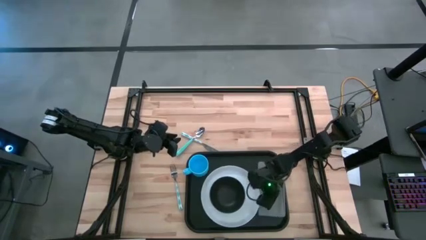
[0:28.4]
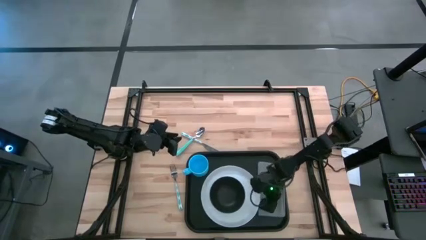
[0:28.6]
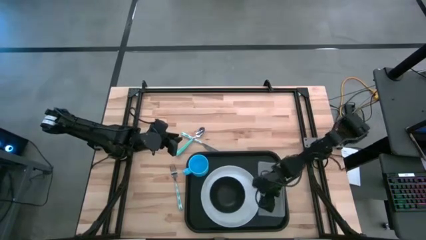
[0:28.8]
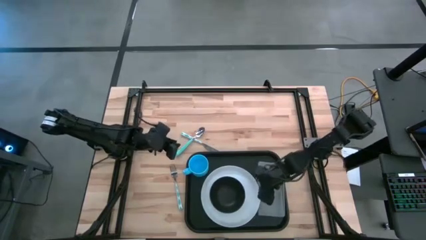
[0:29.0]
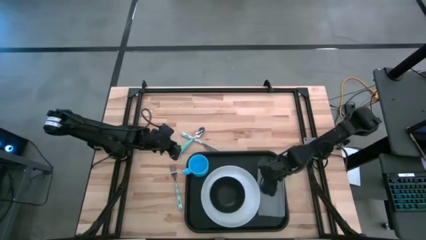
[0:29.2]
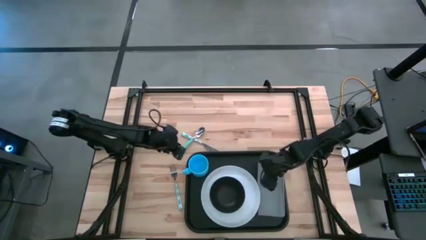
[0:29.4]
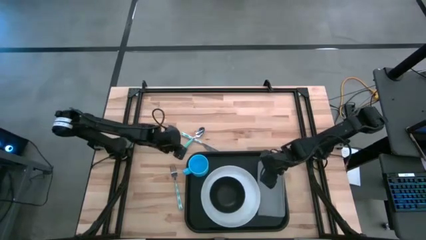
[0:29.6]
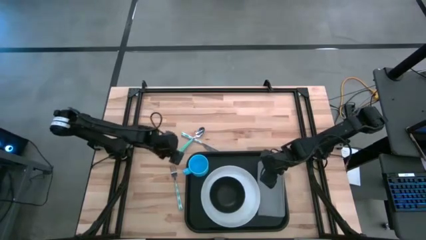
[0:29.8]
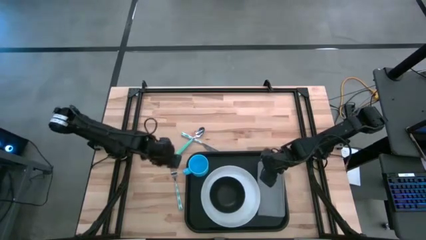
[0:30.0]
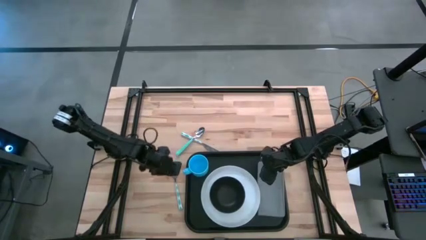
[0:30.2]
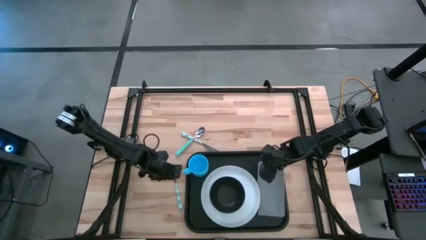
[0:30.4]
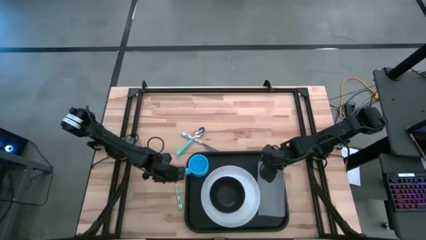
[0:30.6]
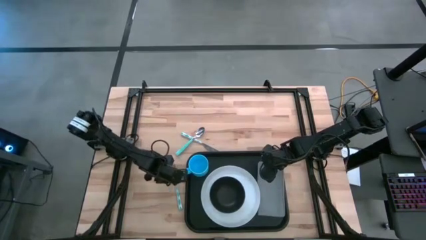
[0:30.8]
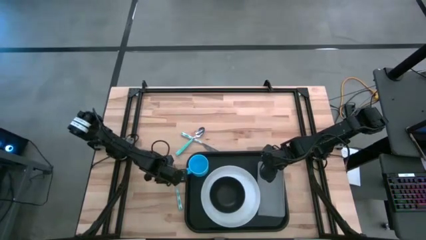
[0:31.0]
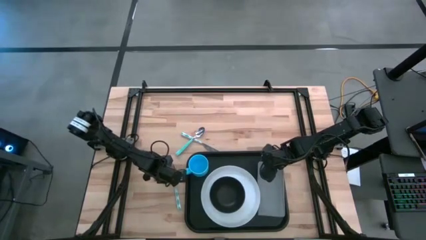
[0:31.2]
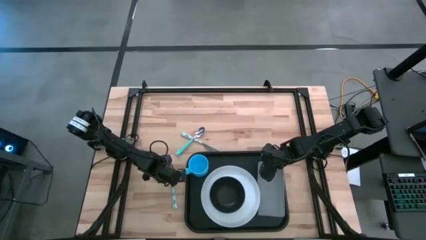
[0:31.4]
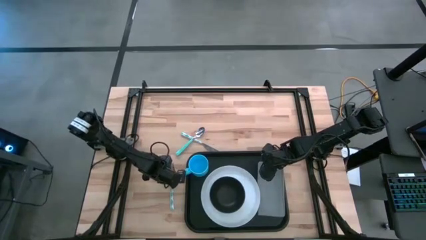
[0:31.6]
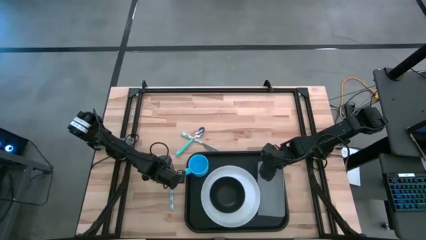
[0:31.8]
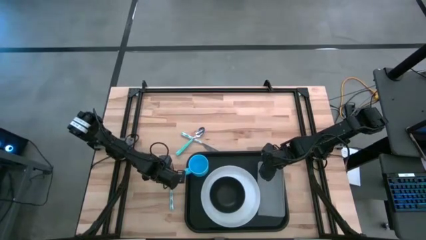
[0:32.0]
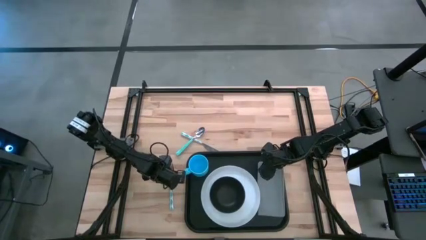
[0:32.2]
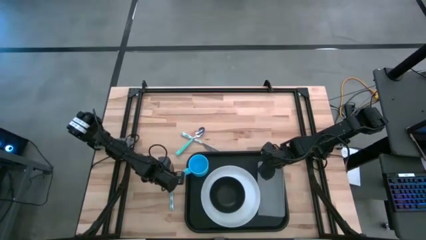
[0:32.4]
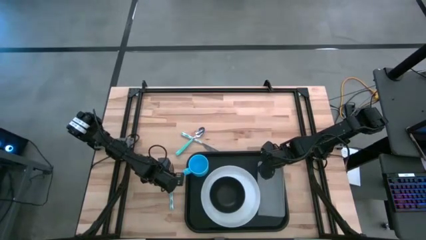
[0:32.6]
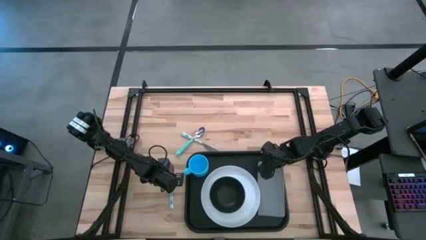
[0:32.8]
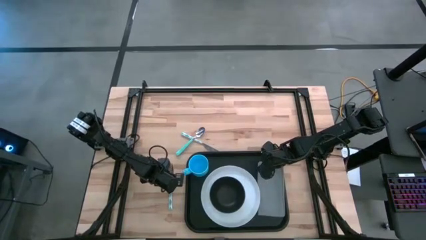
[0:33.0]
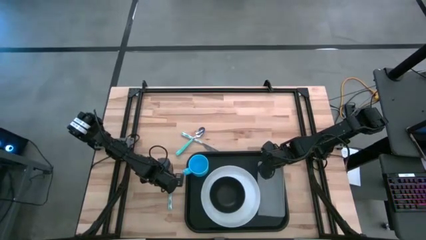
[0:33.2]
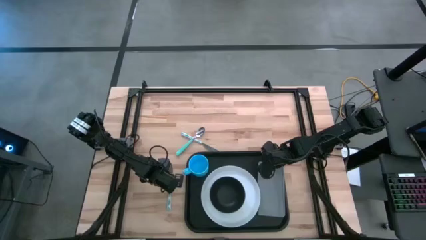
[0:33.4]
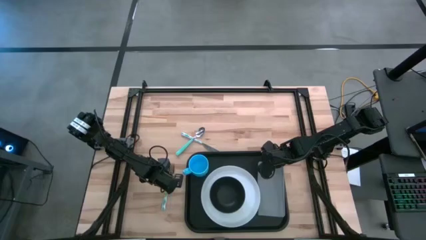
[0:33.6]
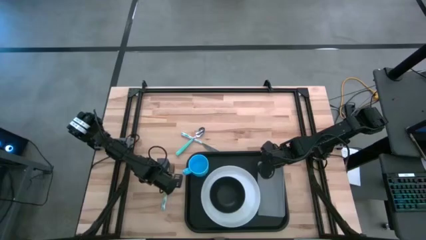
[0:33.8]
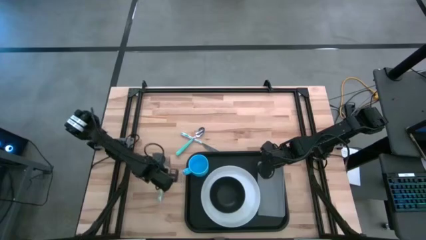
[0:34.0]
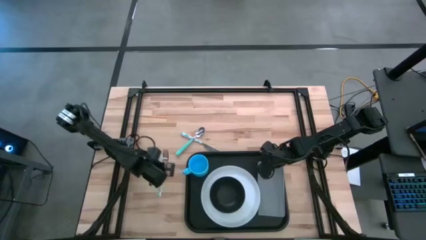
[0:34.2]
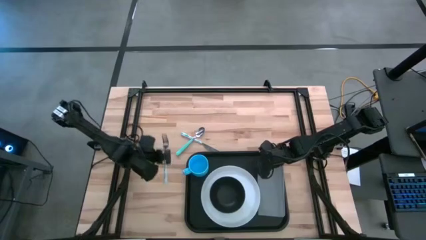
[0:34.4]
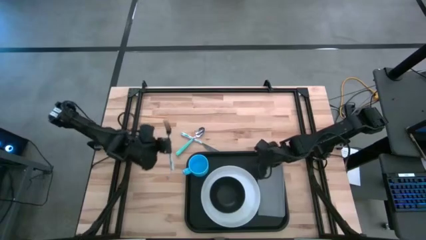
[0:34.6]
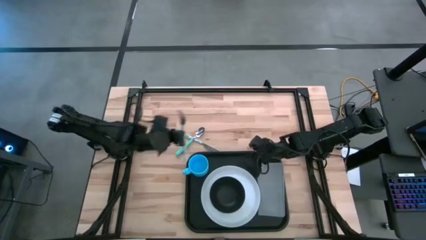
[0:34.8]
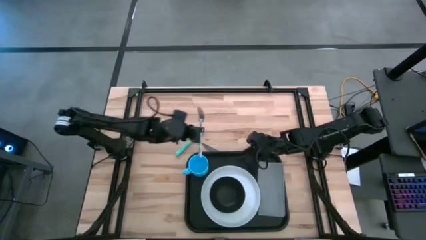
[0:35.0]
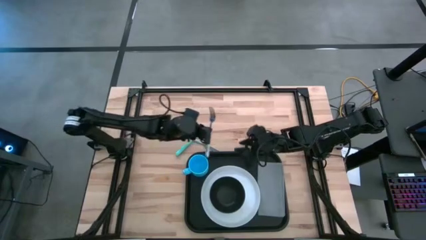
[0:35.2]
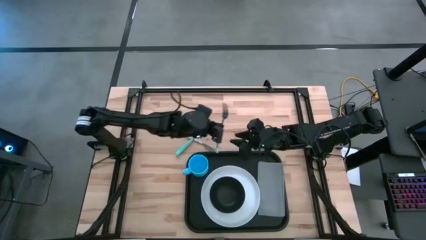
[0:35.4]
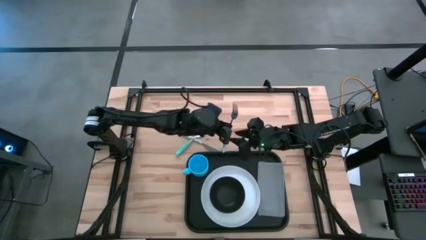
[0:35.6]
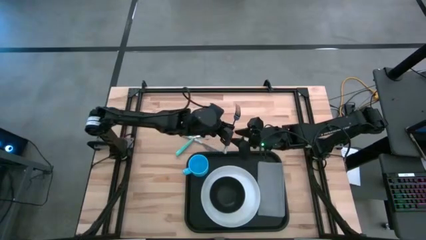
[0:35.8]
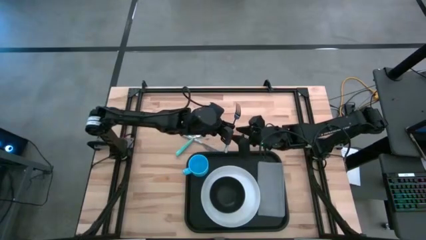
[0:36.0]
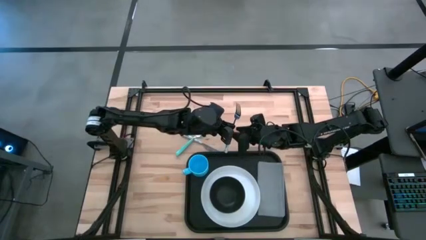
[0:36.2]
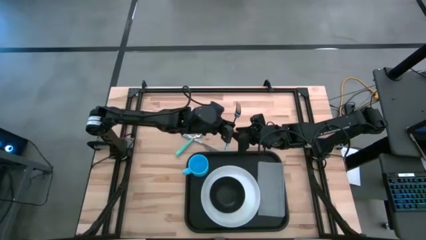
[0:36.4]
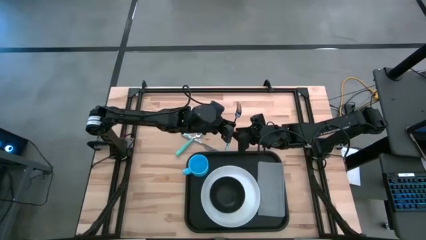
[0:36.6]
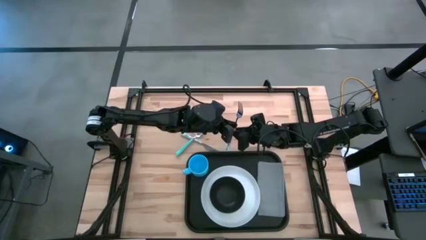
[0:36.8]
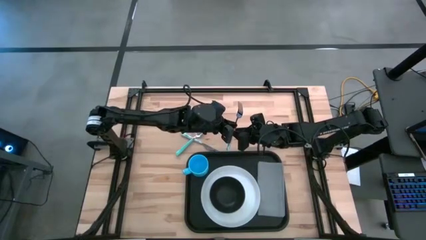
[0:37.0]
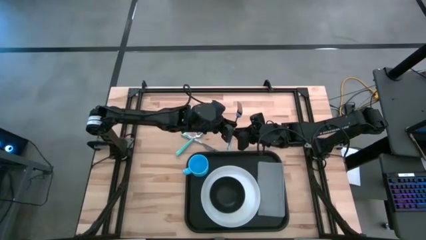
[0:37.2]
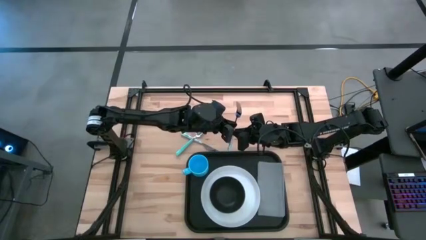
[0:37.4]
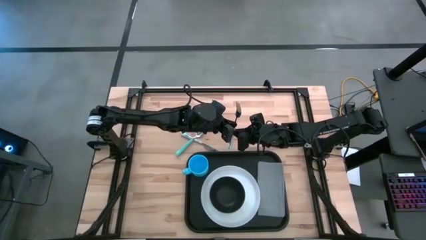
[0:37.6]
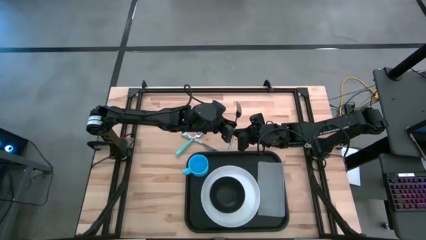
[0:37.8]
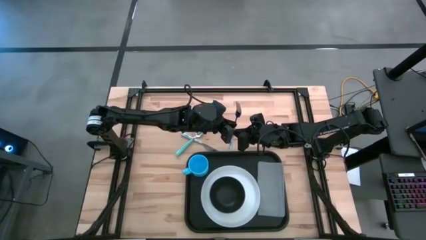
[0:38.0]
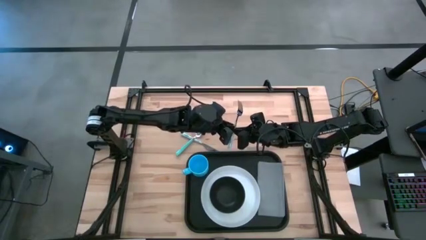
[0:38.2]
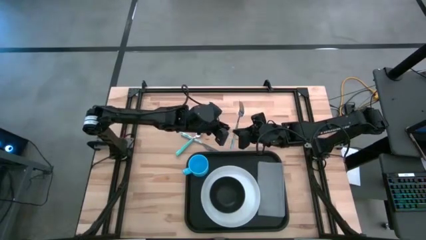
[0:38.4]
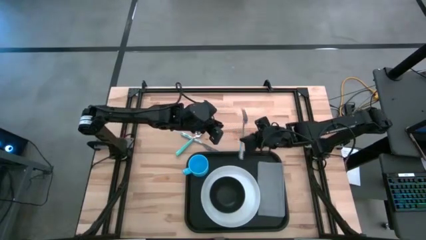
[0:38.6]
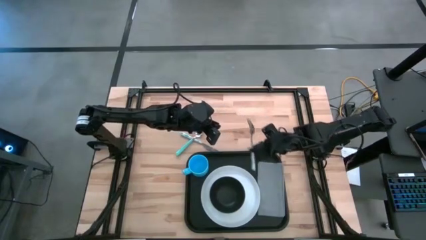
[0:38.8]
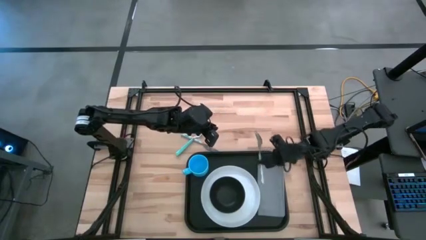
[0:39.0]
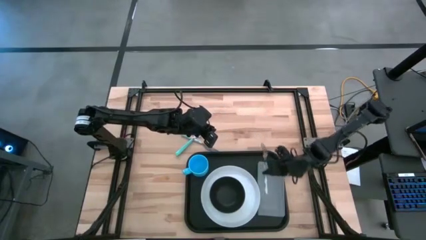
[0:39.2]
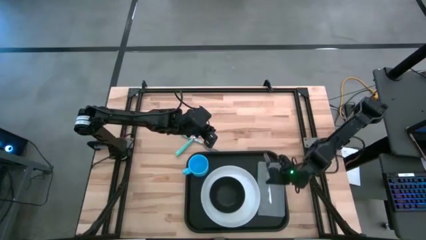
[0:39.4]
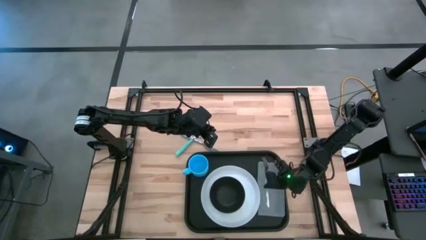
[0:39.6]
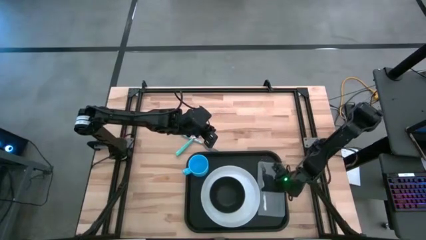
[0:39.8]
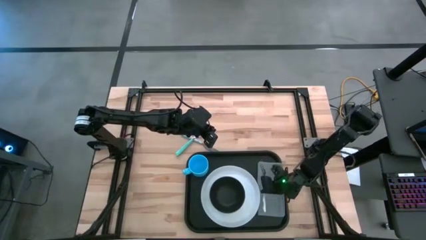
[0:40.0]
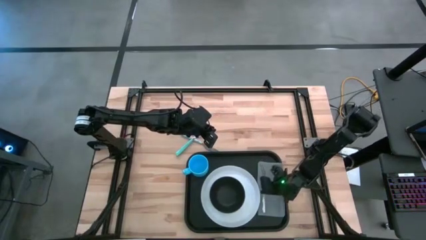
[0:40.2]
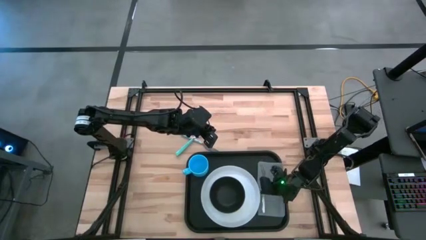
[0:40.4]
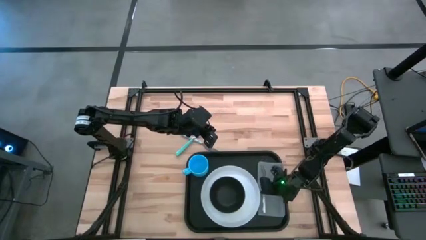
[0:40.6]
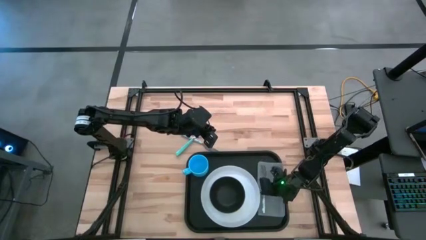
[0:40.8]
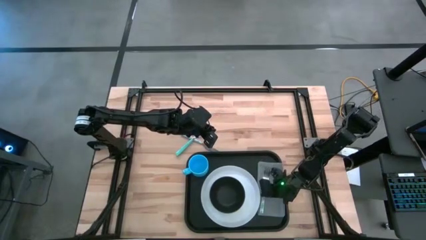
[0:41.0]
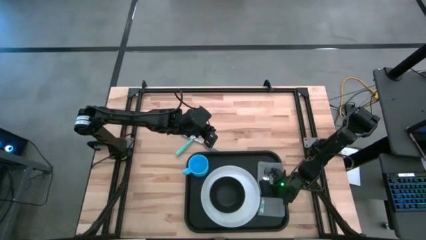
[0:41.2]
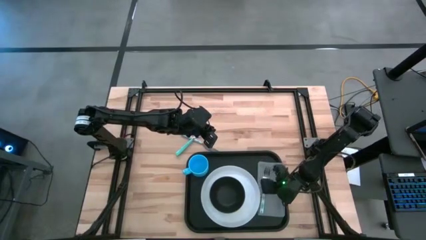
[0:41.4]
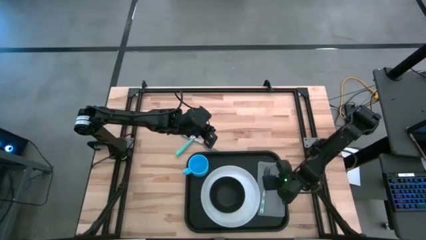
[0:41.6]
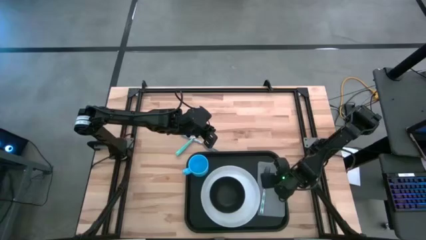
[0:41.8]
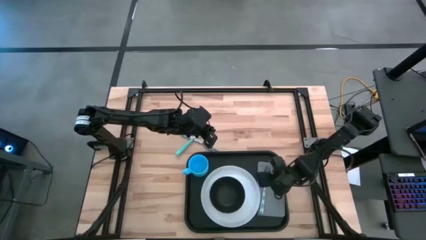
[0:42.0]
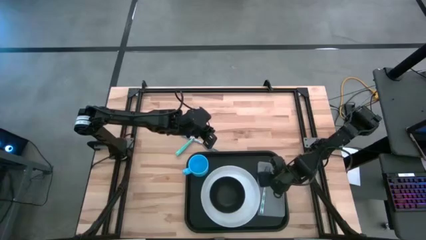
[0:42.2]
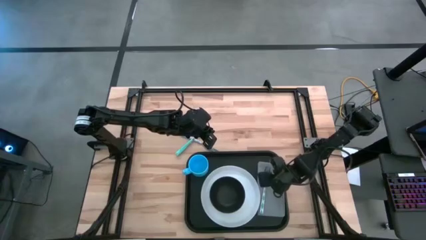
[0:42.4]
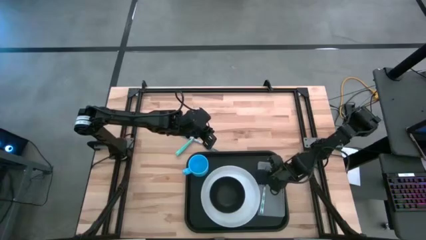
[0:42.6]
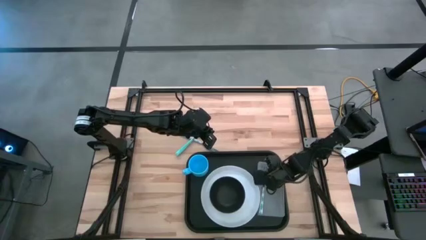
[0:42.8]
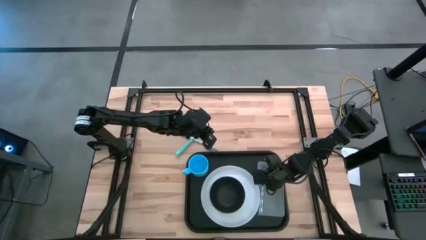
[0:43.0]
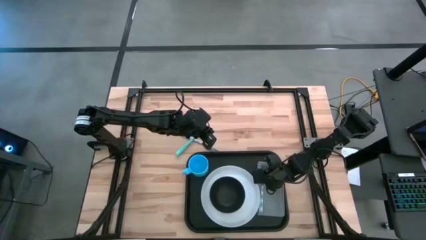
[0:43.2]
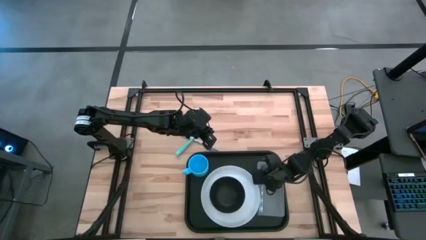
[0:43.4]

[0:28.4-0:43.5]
Task: Set up tray
Put the blue green fork on the gray napkin

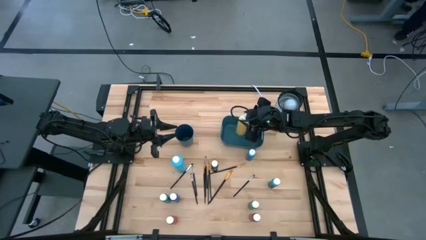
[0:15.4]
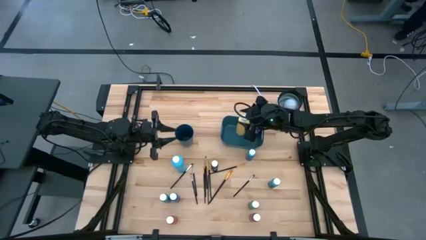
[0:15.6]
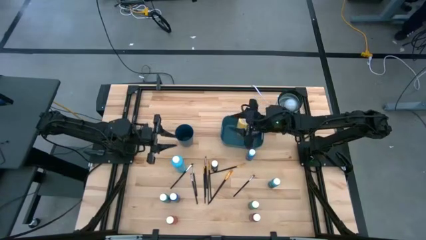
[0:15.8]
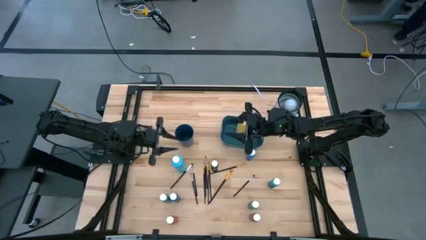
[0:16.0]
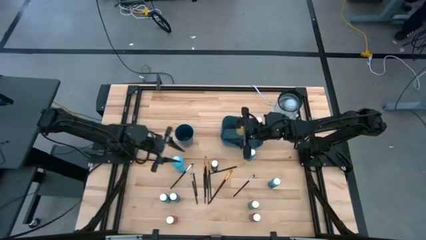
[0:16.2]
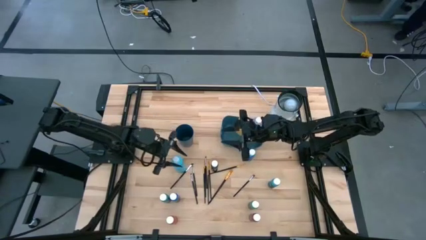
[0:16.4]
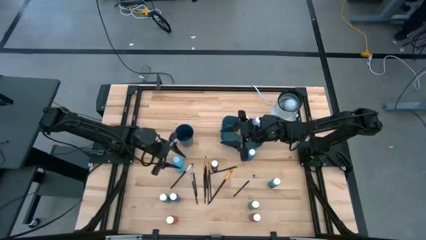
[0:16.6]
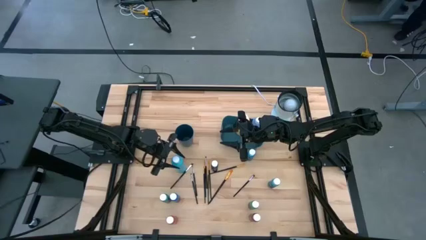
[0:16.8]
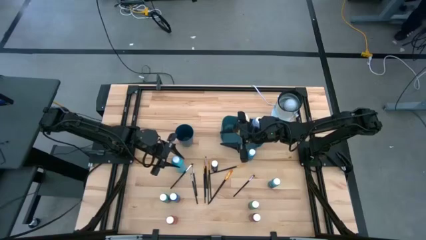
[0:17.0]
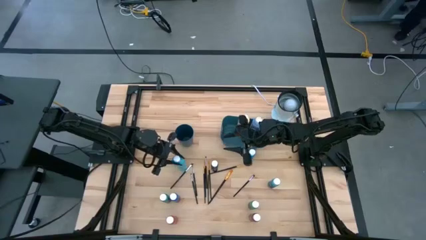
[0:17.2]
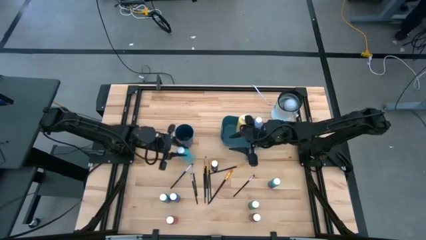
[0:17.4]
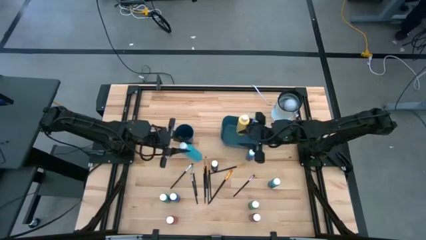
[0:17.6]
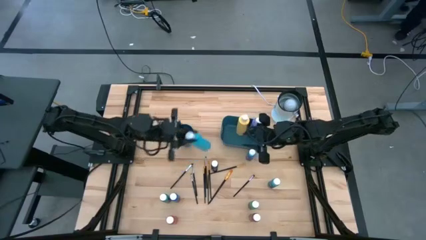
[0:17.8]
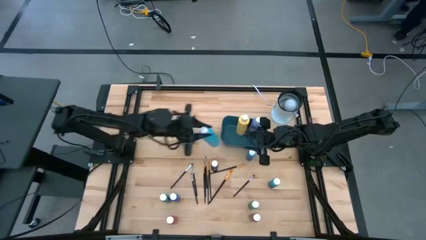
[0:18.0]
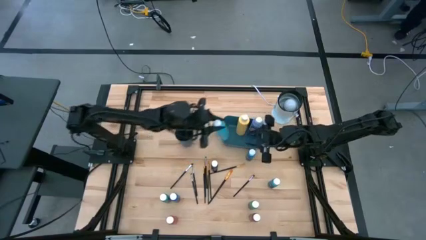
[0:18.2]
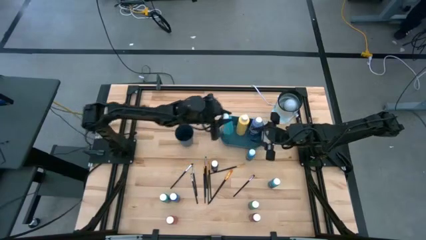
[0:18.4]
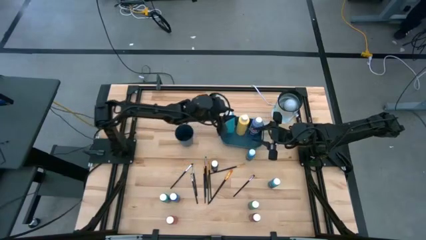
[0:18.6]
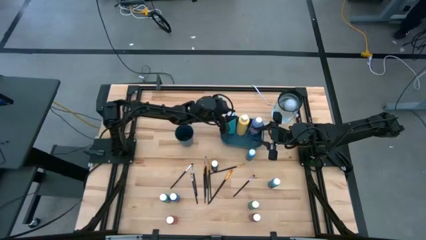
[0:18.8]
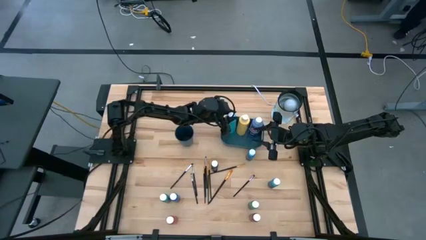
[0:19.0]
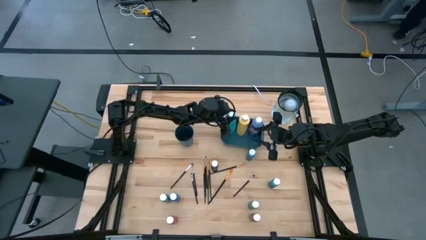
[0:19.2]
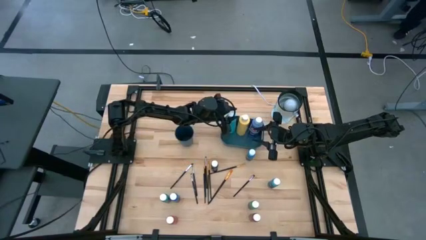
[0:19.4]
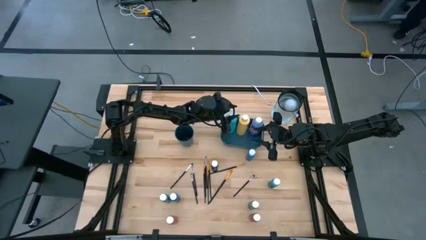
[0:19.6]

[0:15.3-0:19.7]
Task: Pick & Place Paint Supplies
Put the large light blue paint bottle into the blue bin
